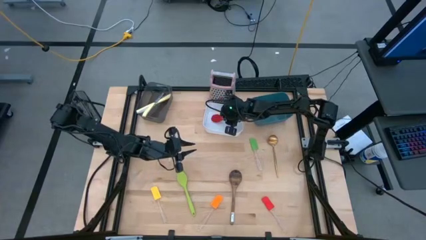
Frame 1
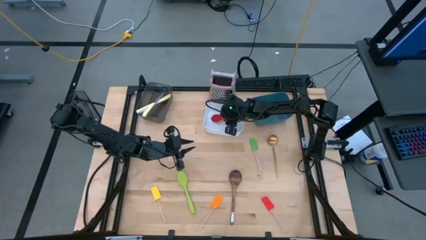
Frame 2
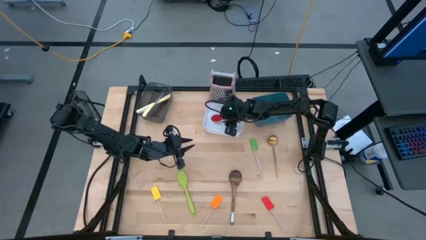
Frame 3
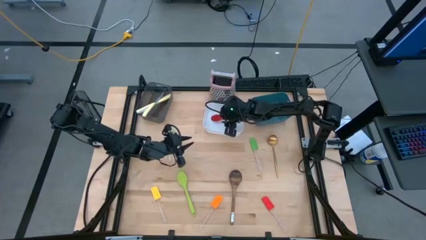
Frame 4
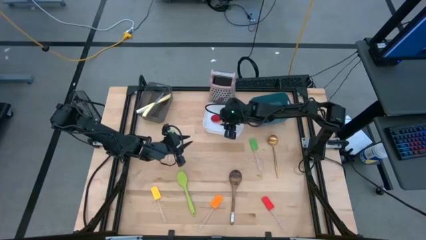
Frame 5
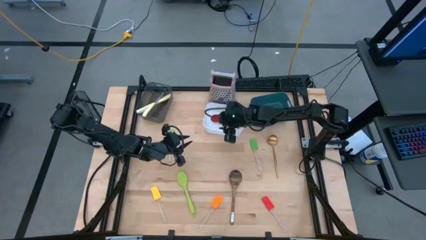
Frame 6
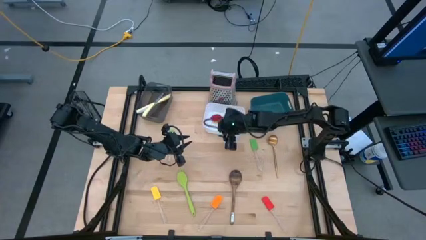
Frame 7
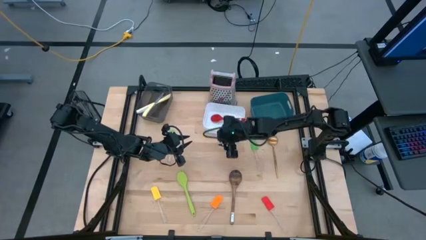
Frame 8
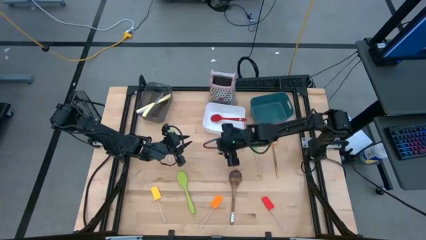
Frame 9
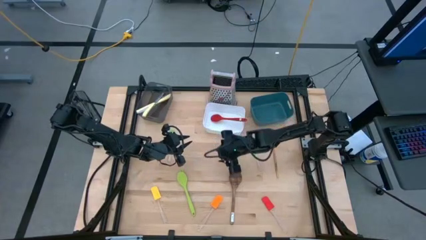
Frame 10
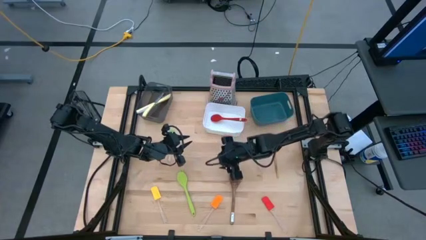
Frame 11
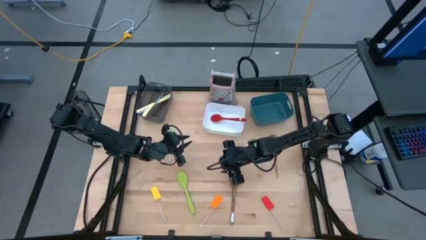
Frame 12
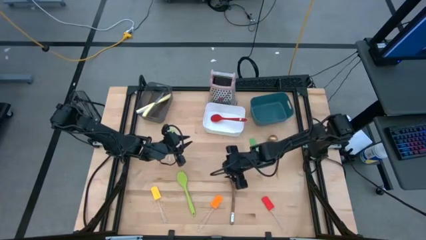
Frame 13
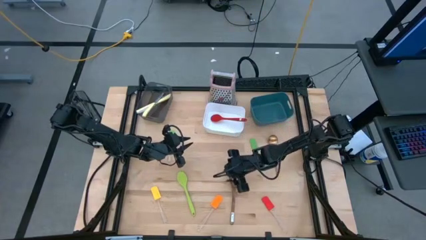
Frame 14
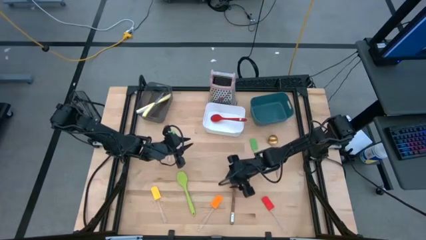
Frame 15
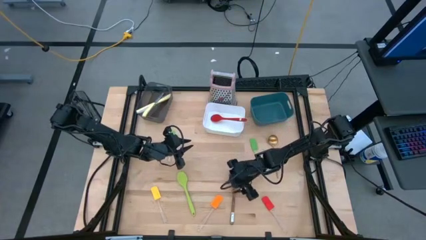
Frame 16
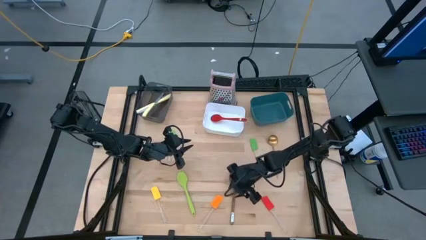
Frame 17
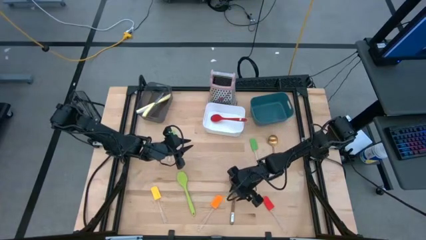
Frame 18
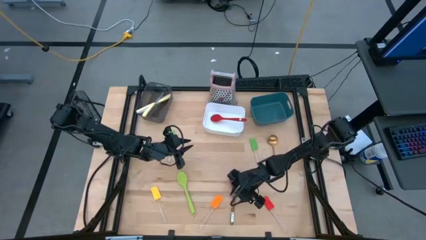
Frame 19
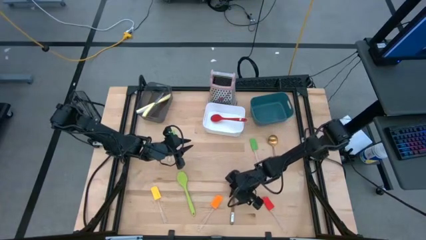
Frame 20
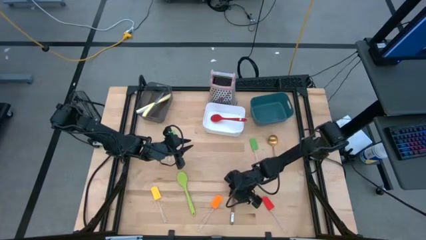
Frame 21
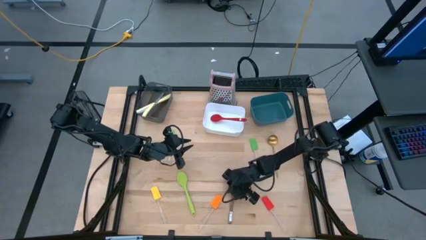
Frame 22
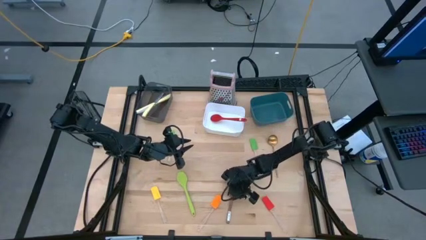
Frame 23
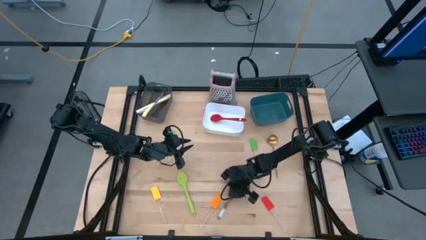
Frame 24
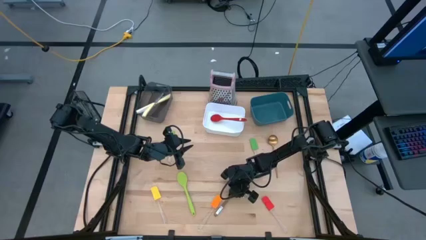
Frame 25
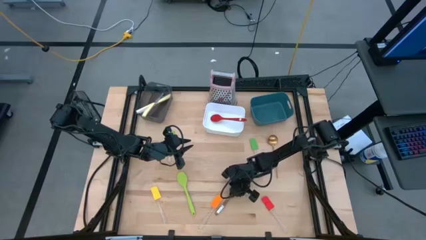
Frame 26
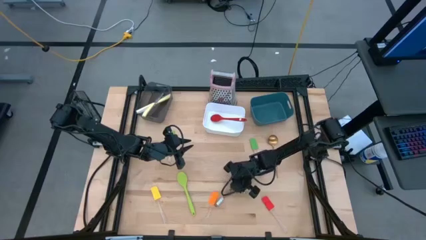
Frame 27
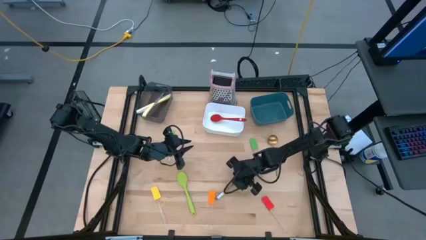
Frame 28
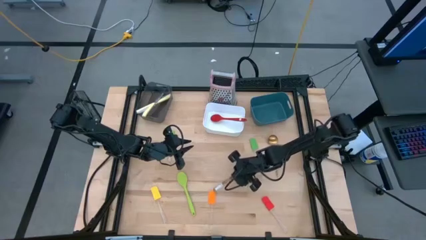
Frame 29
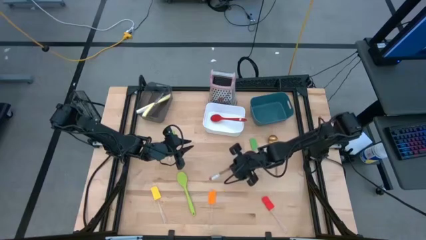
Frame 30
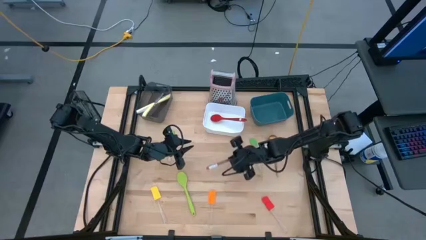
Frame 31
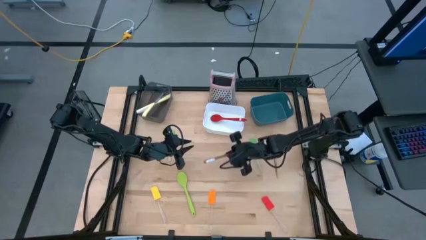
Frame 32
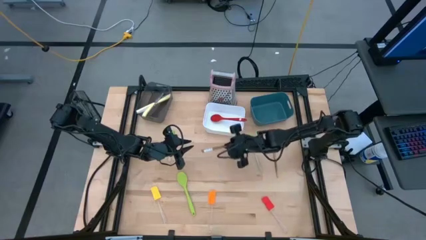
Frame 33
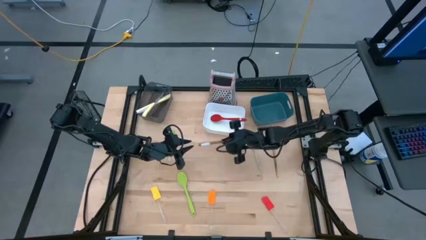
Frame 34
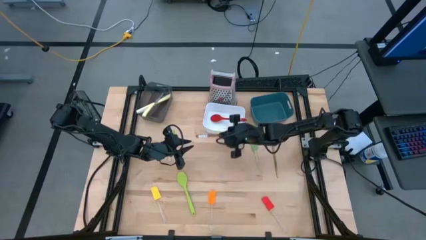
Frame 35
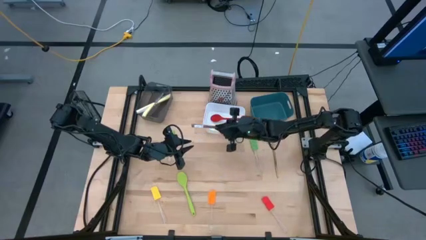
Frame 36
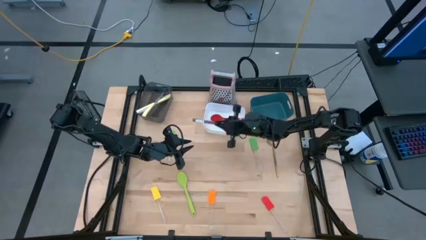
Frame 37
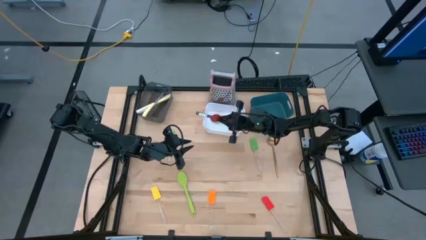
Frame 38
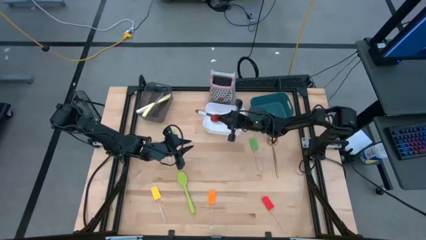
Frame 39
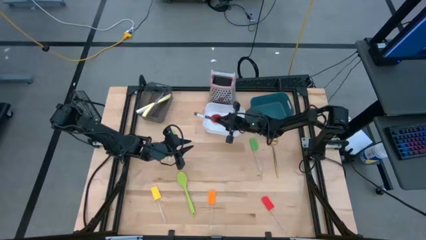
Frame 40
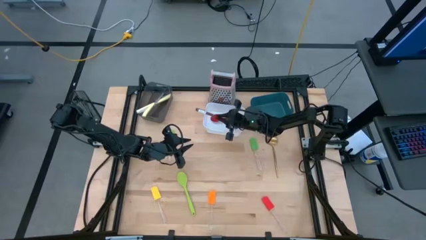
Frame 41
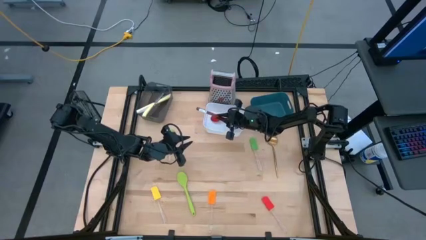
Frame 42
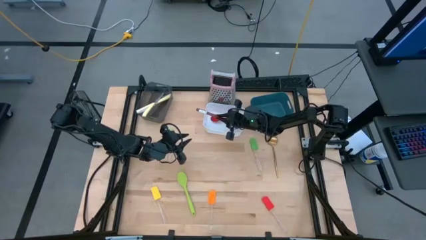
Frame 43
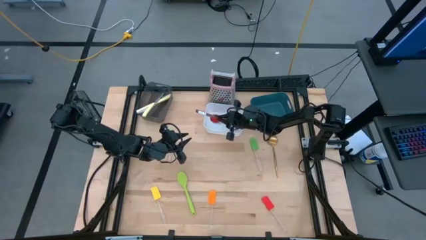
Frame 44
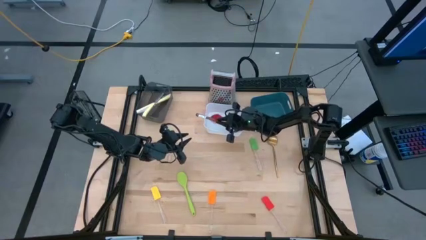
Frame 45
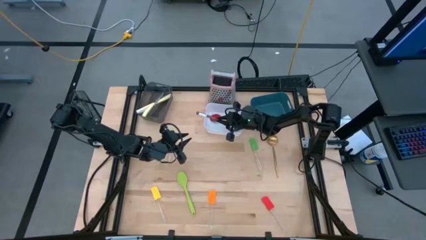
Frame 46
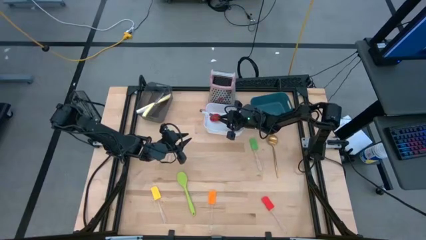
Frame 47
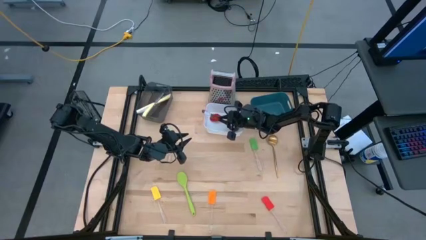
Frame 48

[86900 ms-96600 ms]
Task: Pick & Place Kitchen Items
Put the brown spoon into the white bin

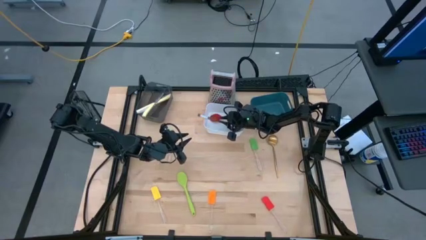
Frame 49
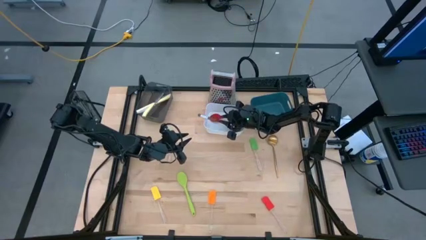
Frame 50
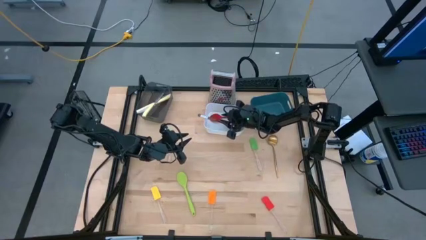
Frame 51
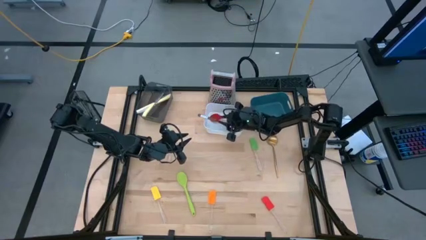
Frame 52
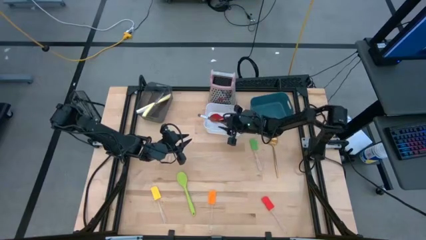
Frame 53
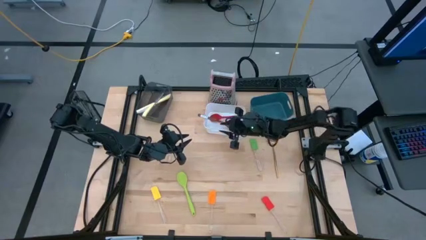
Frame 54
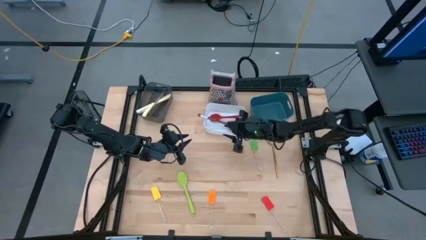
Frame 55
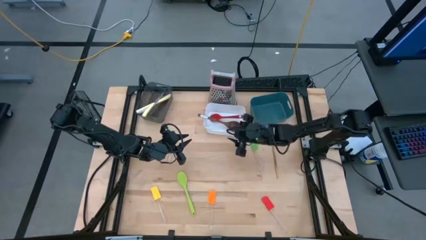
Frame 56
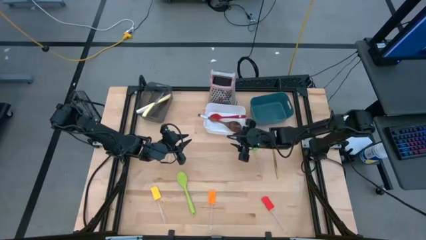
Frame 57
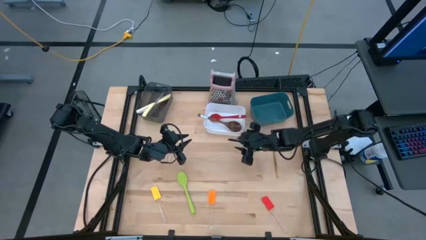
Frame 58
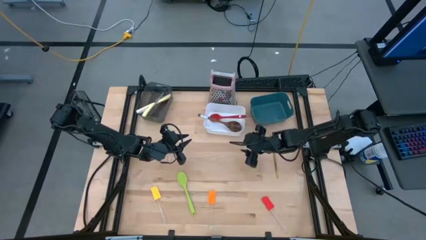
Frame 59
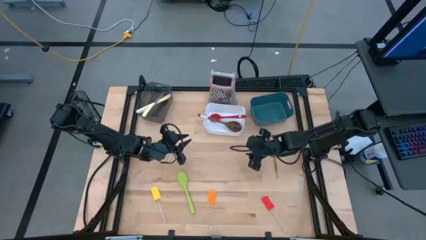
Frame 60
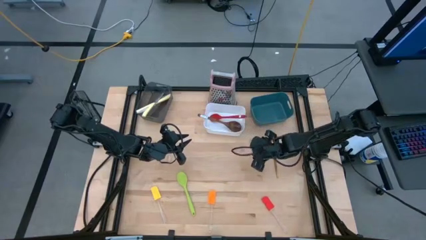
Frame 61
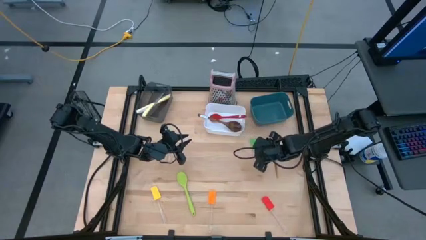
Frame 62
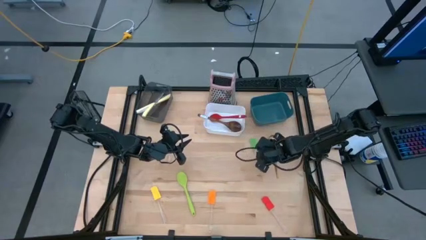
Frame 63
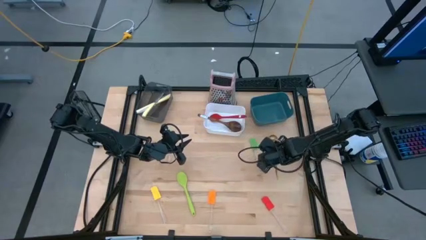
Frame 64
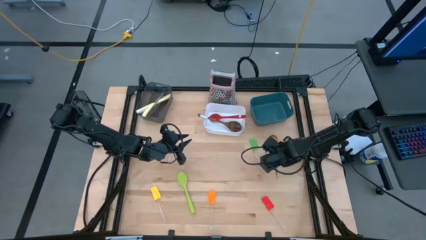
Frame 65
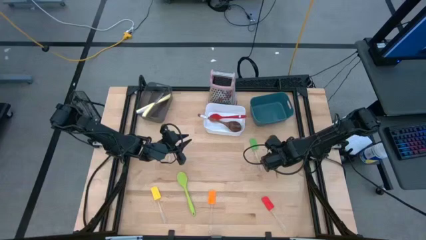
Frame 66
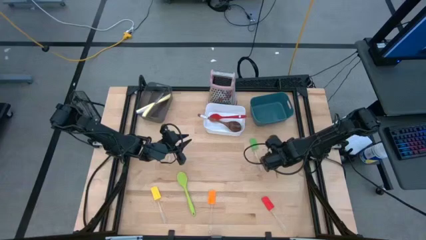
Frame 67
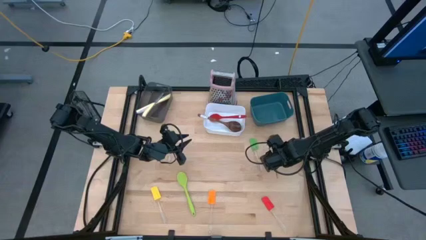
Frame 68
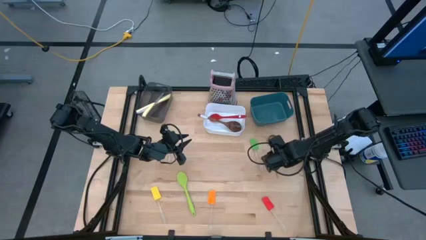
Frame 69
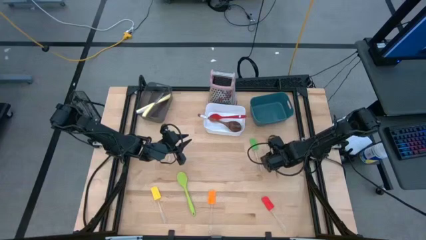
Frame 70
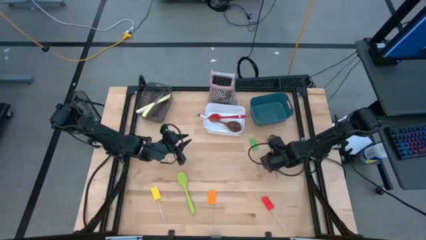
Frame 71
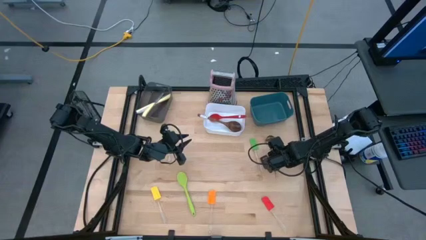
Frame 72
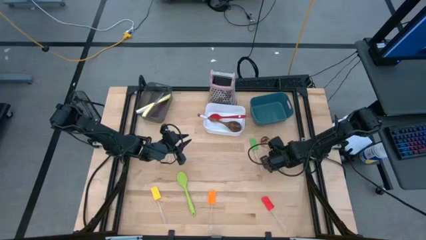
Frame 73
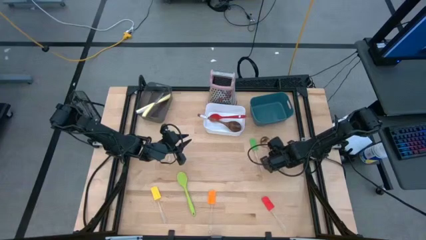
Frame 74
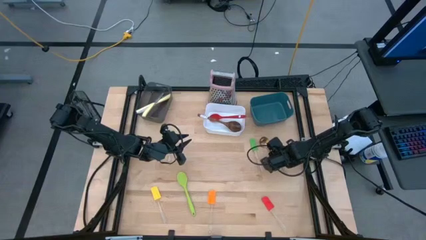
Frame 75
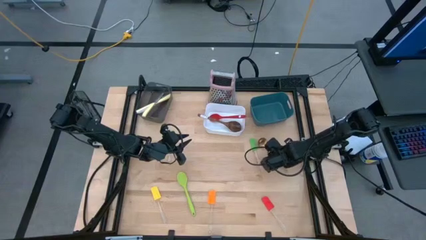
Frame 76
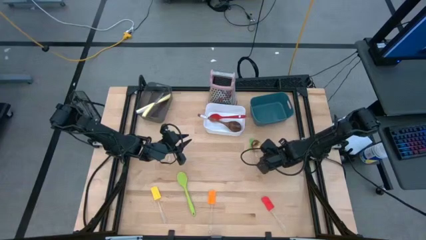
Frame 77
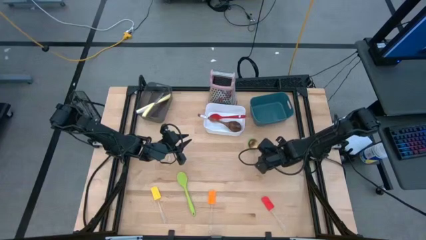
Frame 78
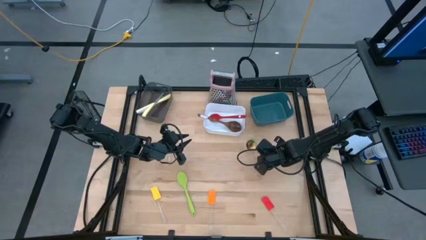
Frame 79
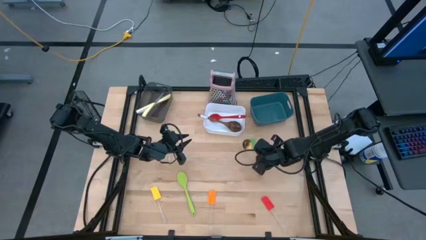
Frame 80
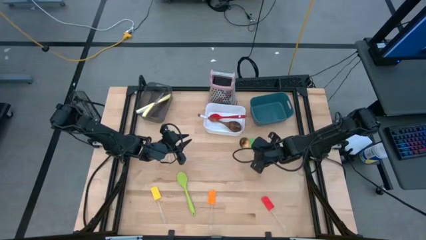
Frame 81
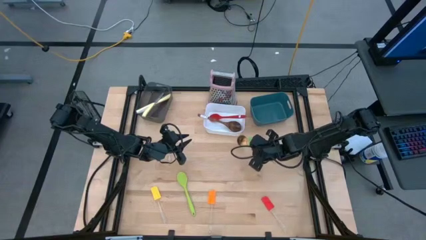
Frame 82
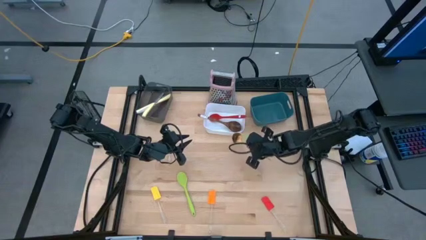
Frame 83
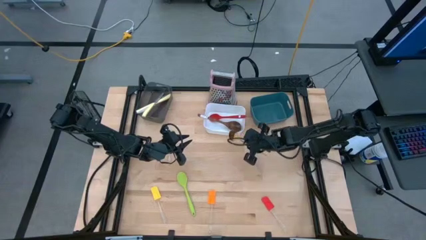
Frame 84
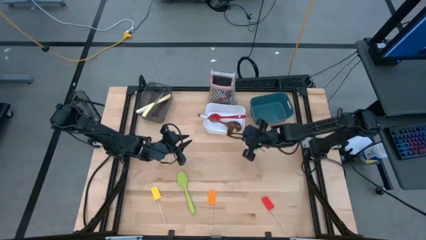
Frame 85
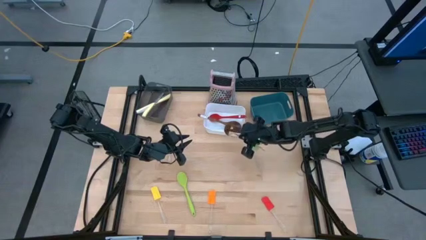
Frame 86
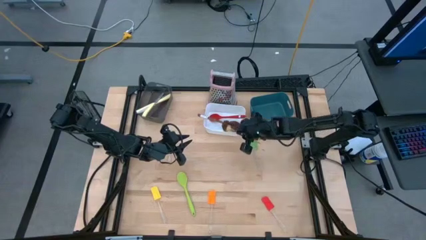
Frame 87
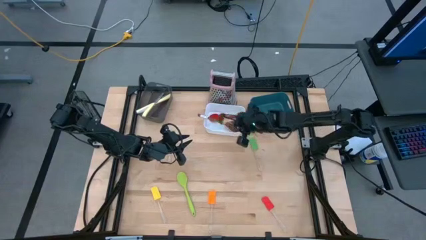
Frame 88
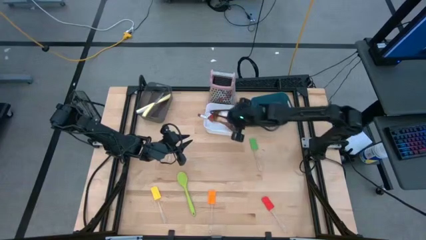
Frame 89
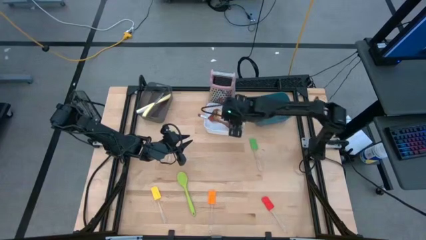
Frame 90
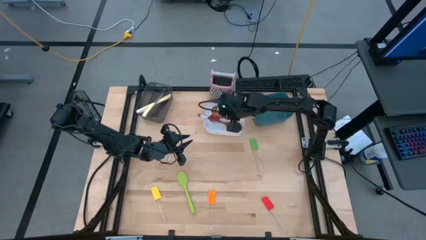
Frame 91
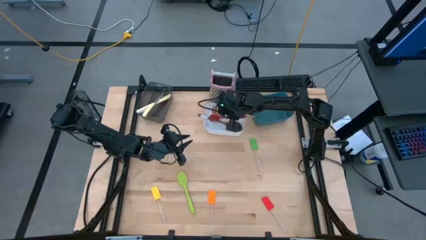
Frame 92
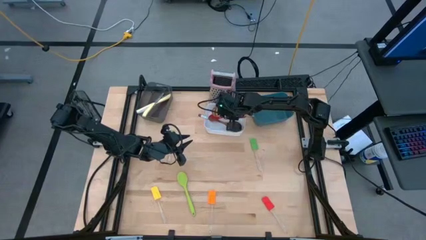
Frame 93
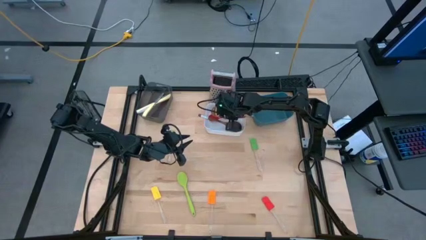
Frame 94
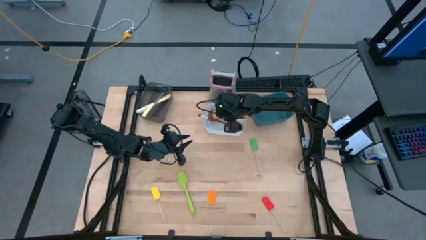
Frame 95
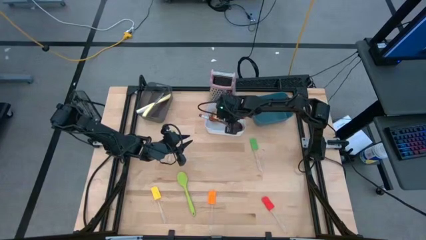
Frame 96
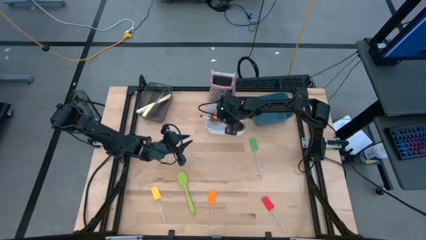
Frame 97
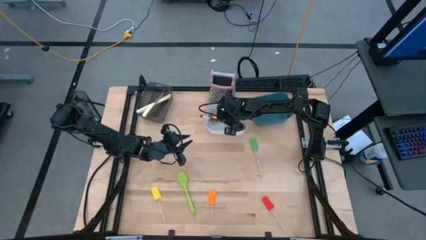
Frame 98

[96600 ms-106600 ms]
Put the gold spoon into the white bin
